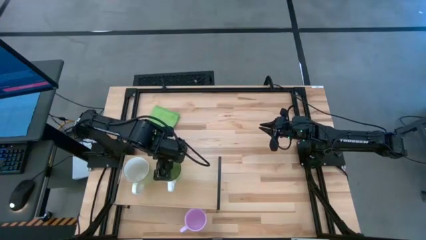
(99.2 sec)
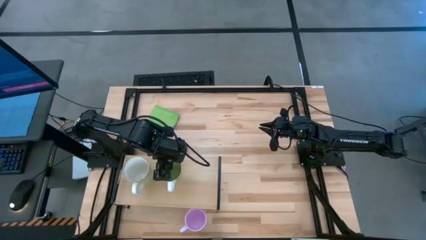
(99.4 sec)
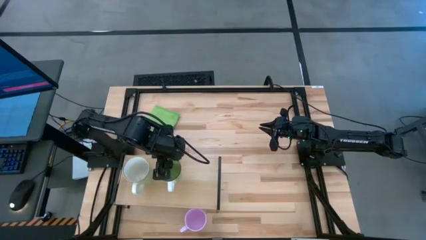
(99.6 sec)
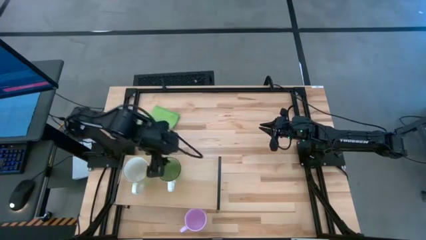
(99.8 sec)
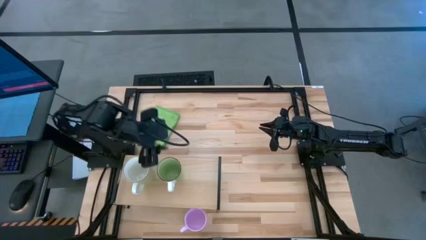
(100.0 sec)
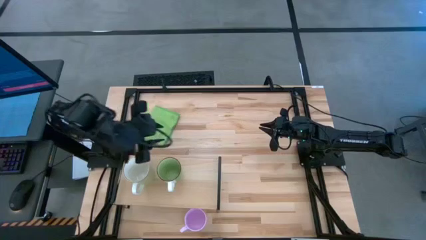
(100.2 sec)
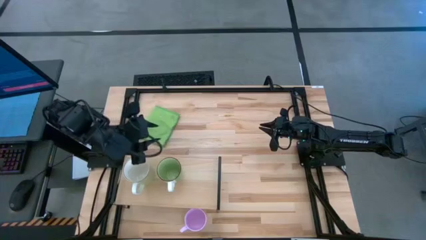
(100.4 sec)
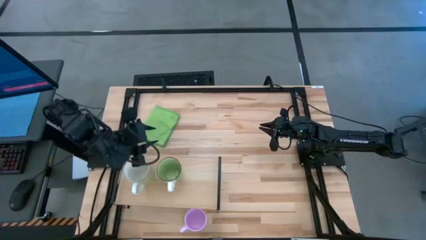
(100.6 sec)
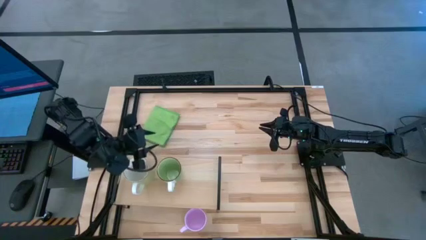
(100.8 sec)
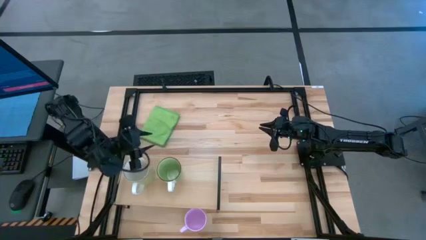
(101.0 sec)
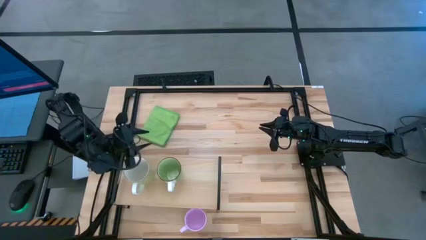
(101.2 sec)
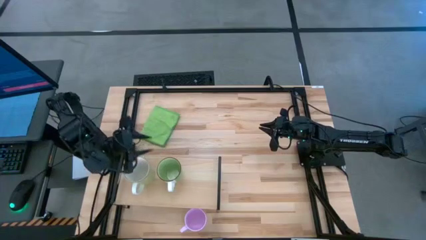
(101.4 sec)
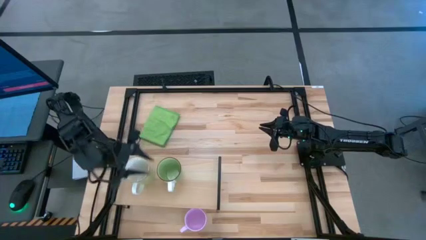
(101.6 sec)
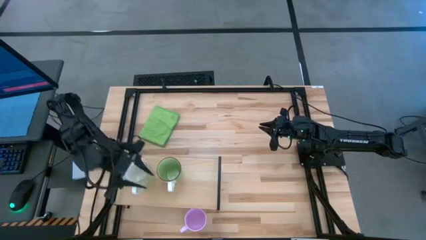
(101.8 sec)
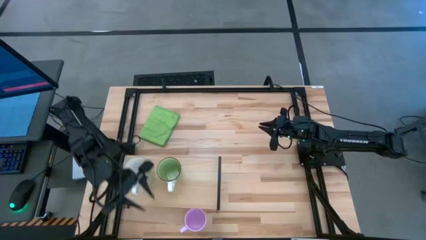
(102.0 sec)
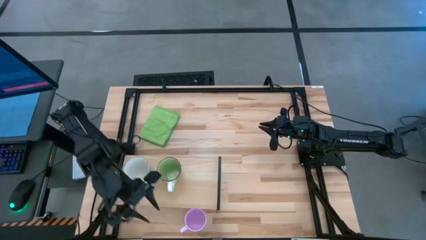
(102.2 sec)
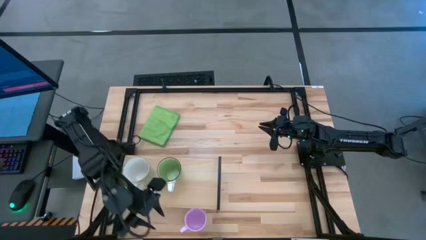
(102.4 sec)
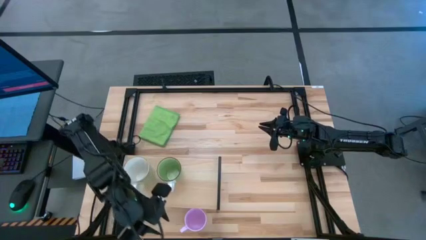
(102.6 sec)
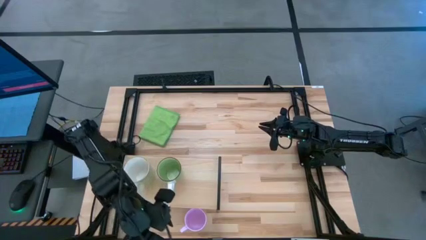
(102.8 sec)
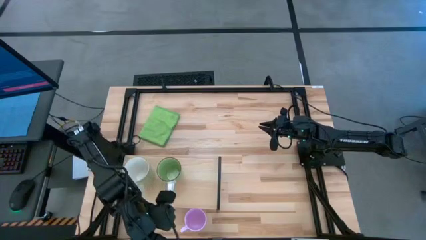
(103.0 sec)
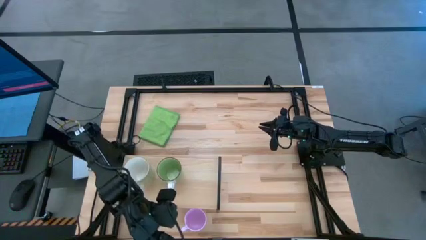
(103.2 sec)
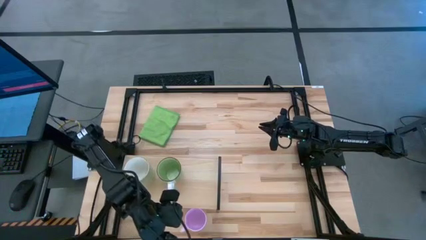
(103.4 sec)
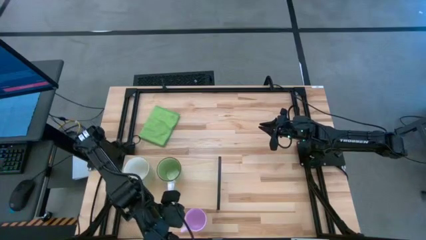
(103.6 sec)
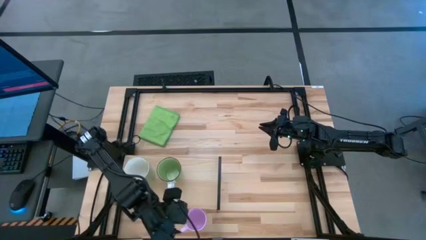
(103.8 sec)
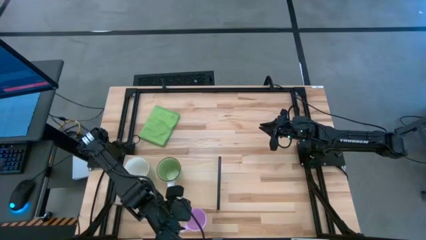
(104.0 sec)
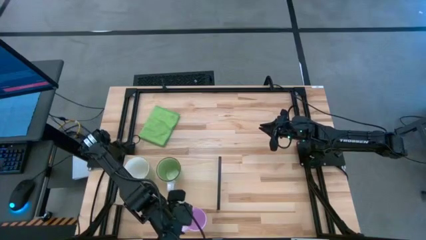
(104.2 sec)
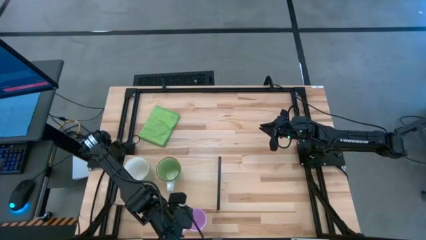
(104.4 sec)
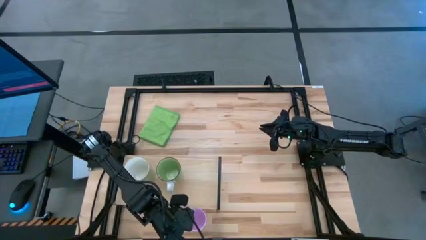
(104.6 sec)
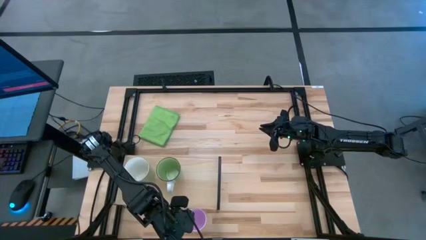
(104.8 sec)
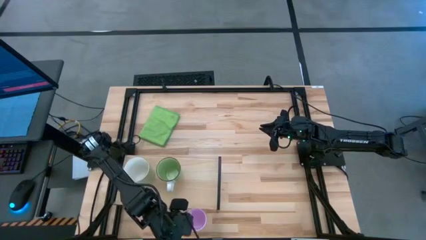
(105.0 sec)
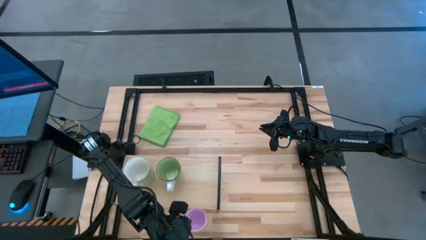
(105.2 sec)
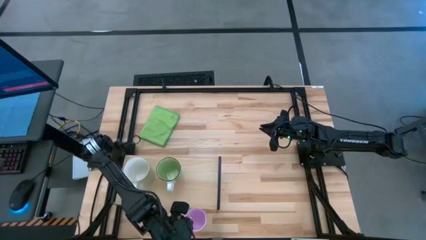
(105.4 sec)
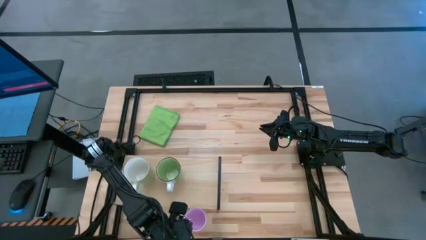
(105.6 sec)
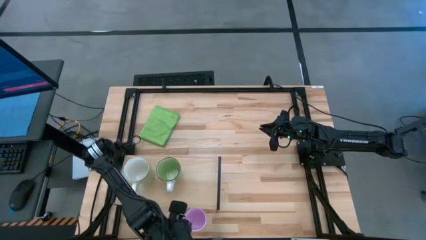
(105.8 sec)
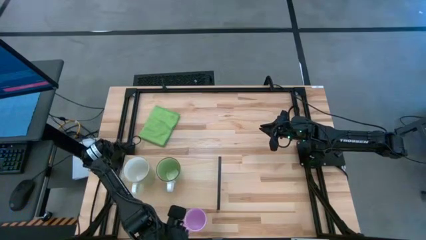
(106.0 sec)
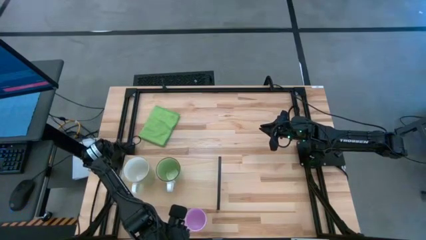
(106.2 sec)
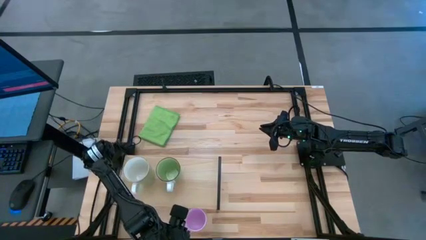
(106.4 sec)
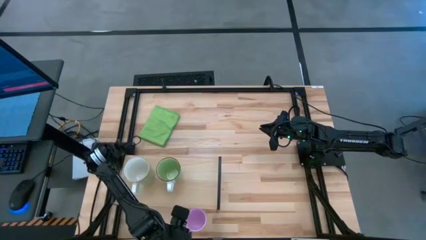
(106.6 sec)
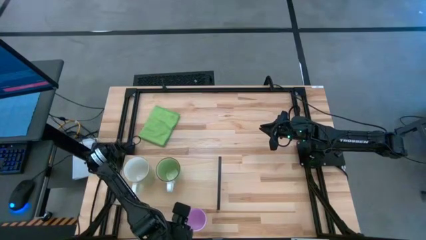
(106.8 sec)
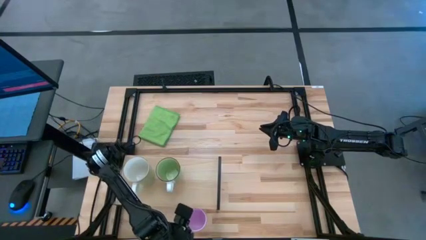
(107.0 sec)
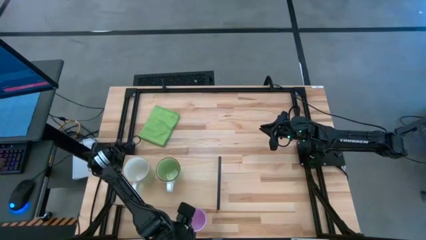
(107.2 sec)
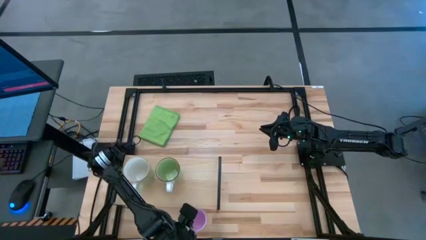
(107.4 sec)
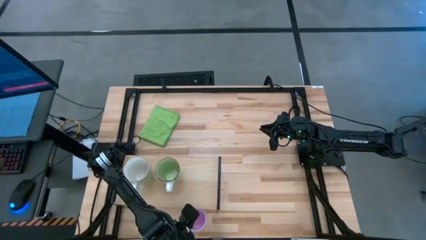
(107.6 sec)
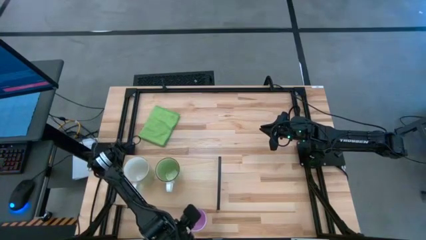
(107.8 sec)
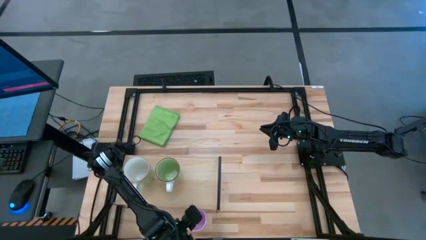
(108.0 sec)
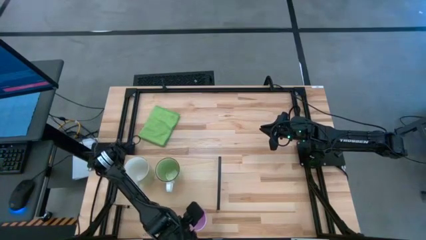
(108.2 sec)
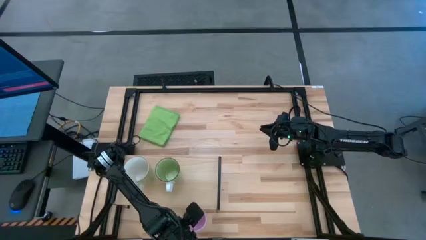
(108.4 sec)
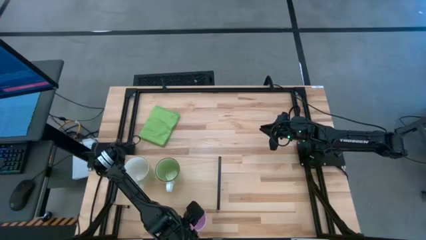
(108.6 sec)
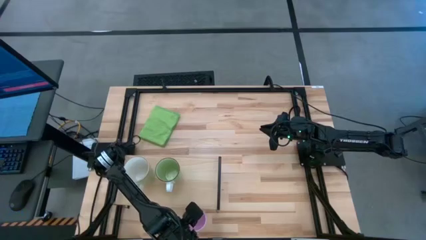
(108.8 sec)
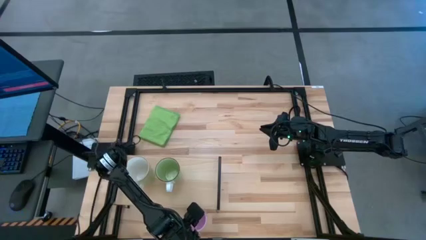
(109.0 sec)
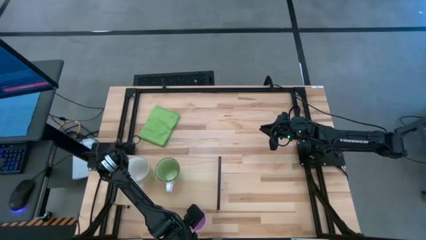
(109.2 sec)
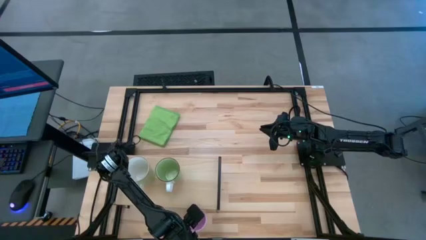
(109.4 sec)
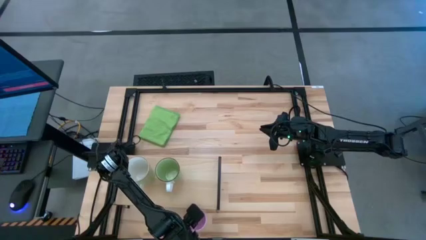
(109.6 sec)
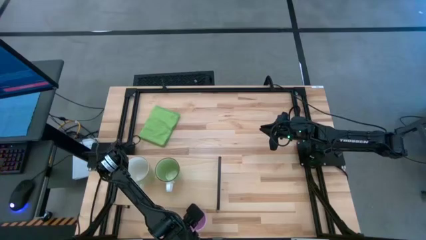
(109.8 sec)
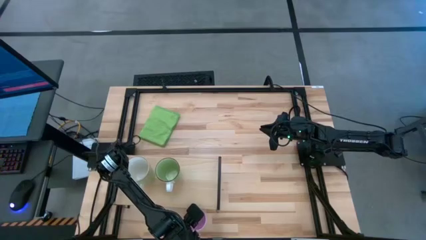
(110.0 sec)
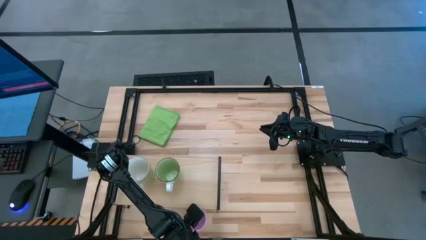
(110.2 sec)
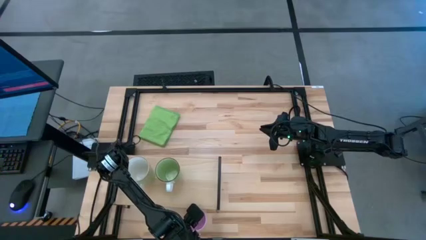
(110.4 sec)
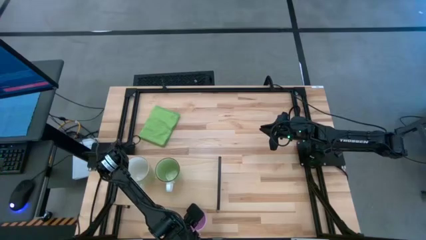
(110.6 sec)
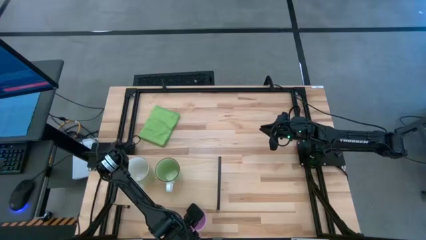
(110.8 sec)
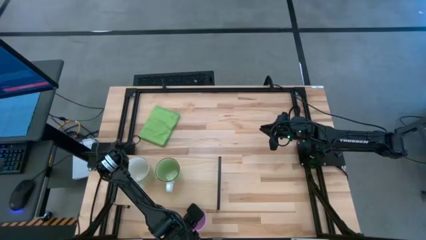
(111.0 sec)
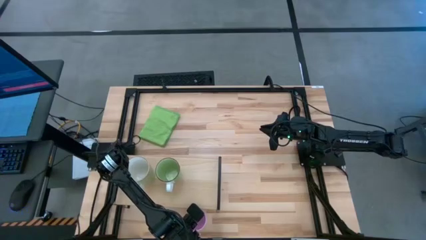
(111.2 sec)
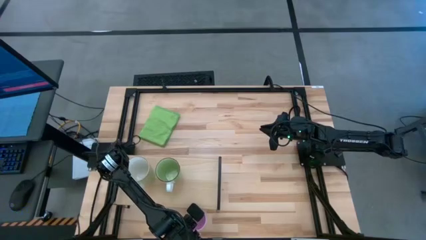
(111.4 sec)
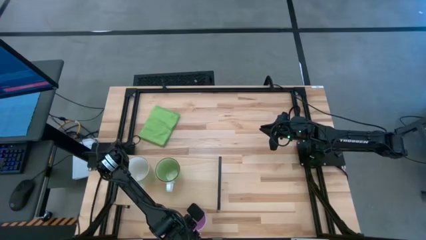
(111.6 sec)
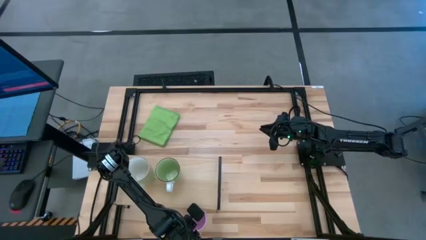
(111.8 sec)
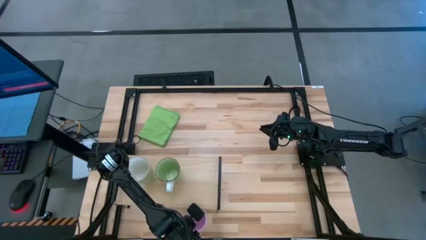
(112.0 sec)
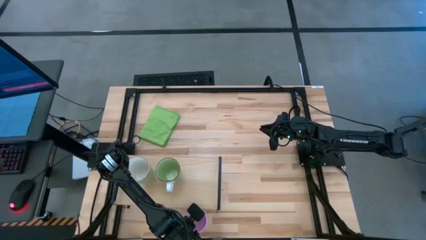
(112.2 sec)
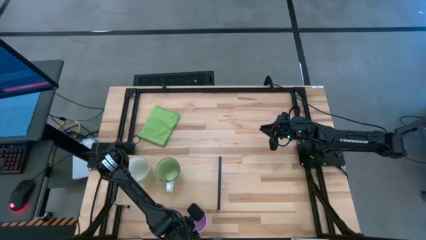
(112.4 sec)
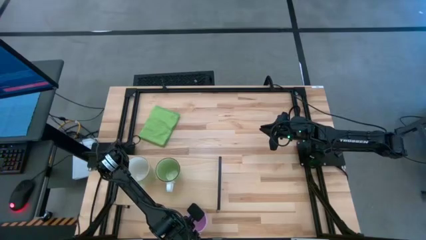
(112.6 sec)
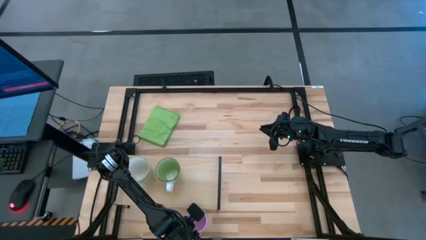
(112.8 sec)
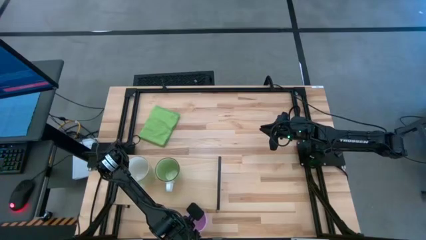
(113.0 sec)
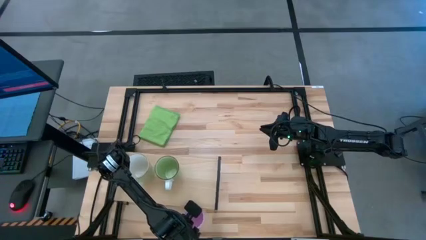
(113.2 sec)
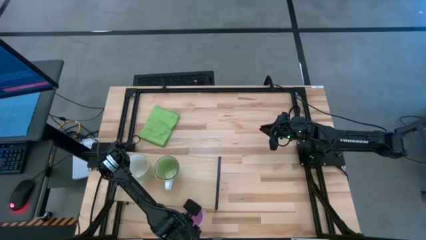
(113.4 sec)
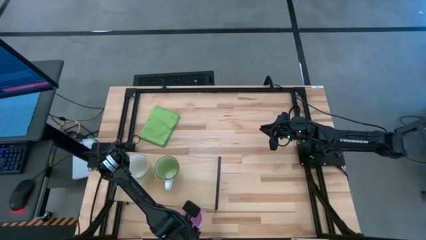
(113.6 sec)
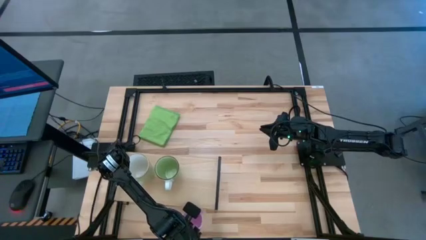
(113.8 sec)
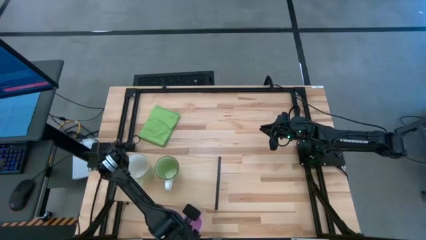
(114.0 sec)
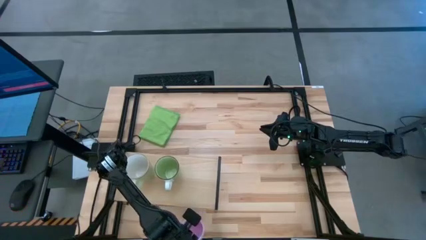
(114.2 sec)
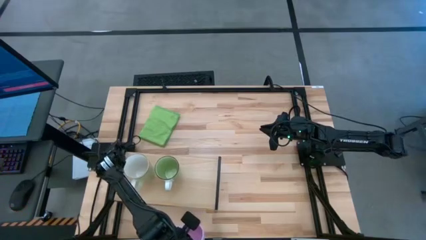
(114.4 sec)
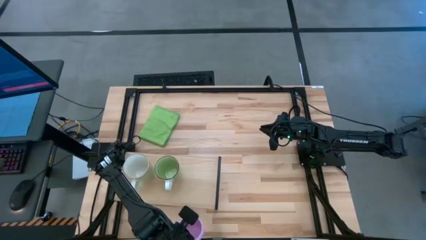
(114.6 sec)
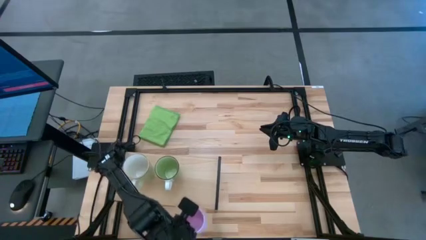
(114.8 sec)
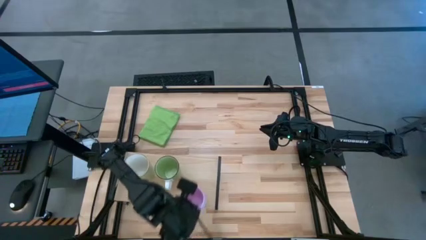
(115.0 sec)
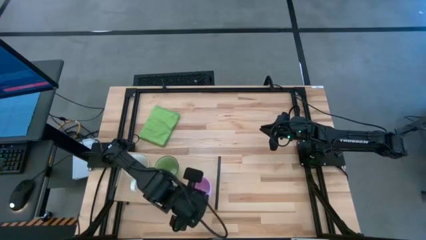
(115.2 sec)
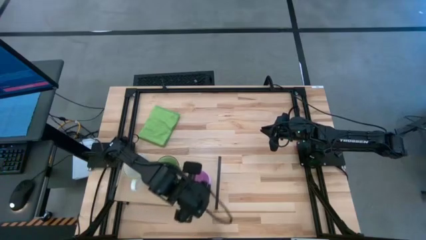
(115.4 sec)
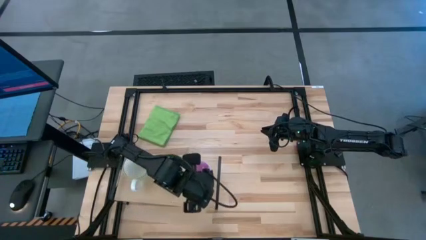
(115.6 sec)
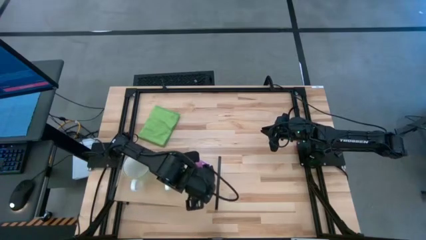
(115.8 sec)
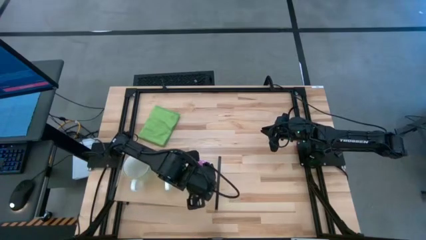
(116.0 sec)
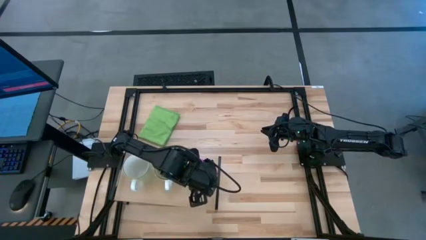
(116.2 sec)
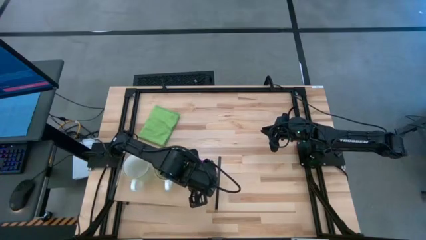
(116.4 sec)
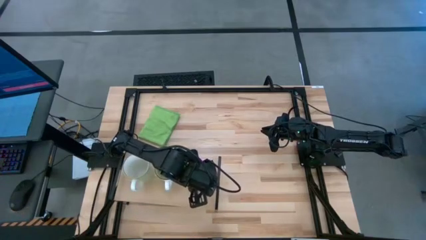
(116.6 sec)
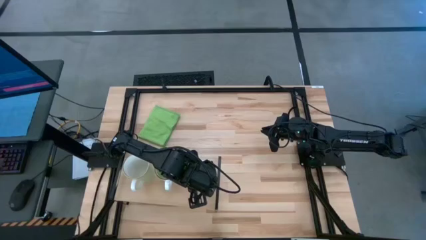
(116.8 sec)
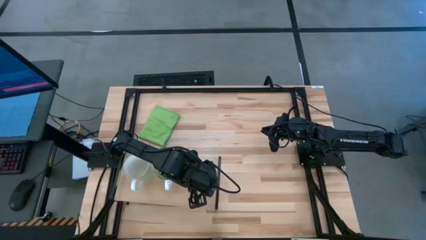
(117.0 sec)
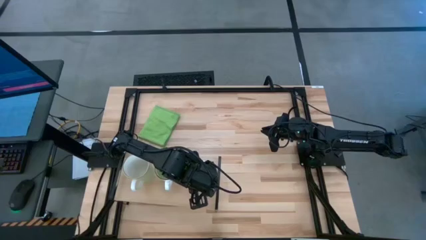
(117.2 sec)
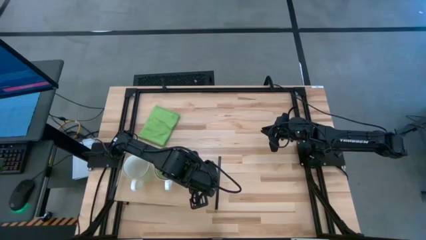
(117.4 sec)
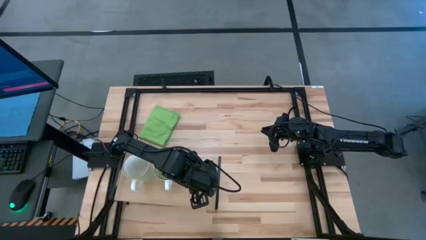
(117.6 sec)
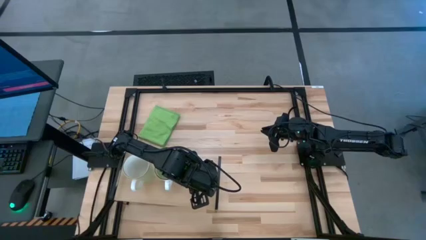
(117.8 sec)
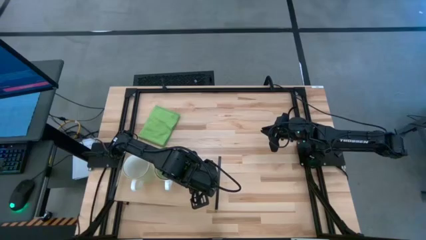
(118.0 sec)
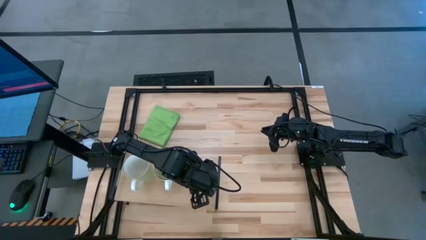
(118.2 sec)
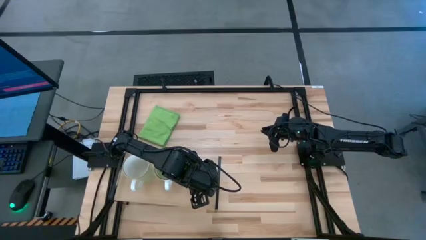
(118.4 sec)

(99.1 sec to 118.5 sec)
Task: Stack small to large cups/mugs on shelf
Put the purple mug on the shelf
